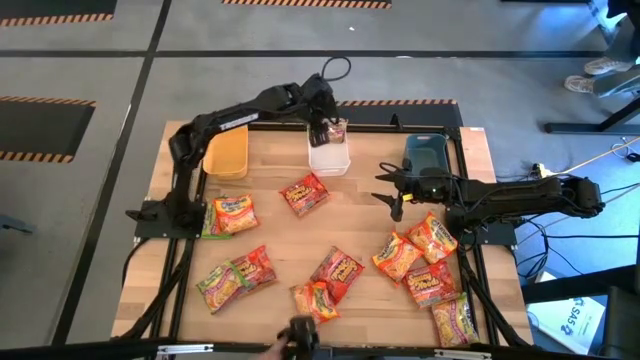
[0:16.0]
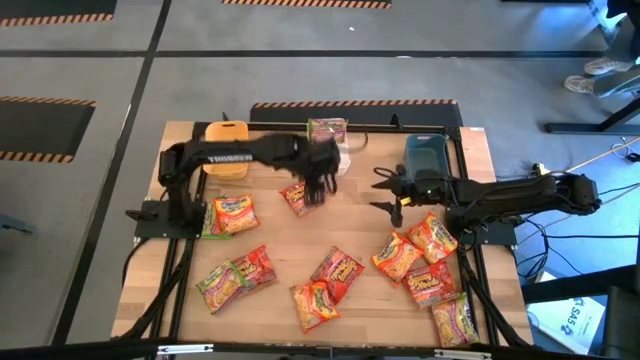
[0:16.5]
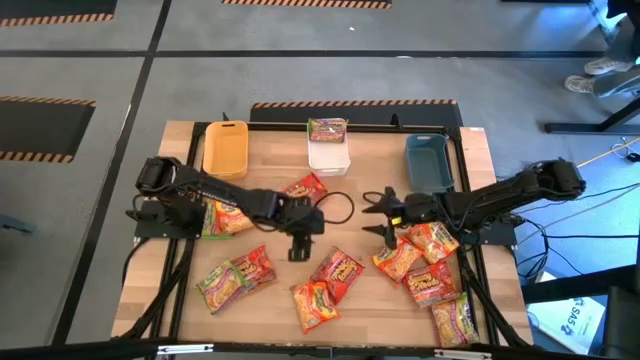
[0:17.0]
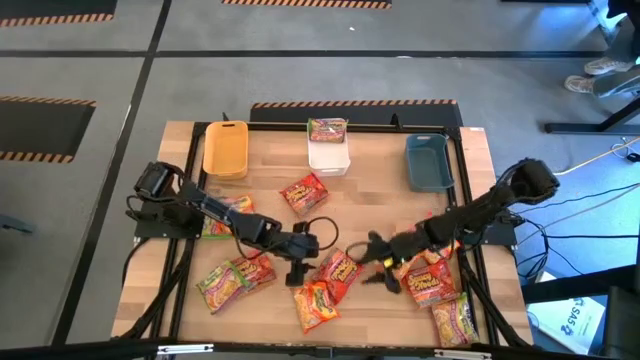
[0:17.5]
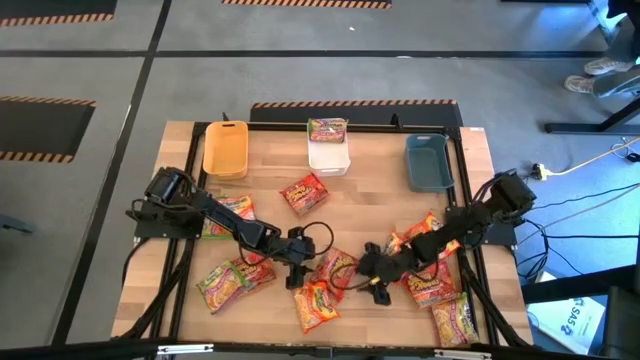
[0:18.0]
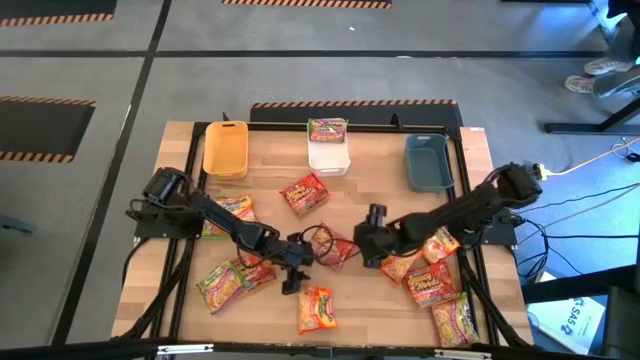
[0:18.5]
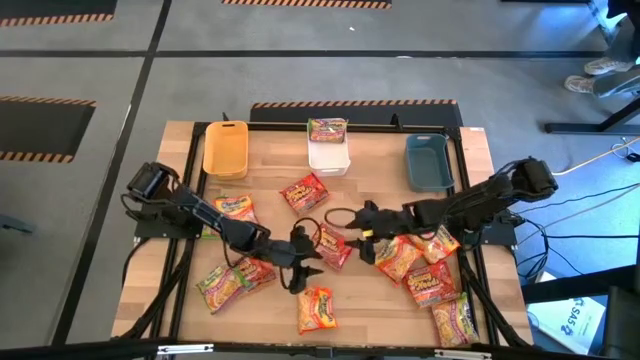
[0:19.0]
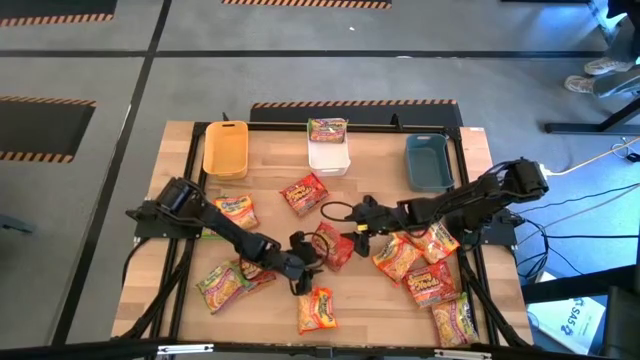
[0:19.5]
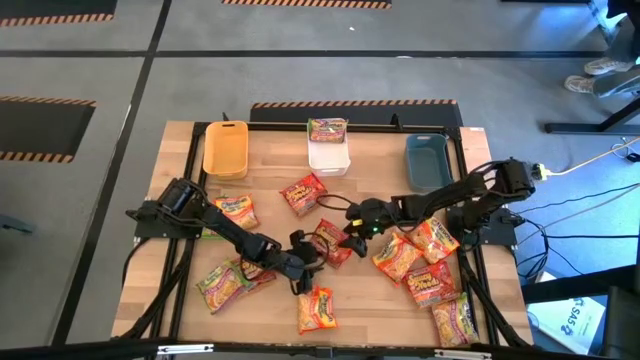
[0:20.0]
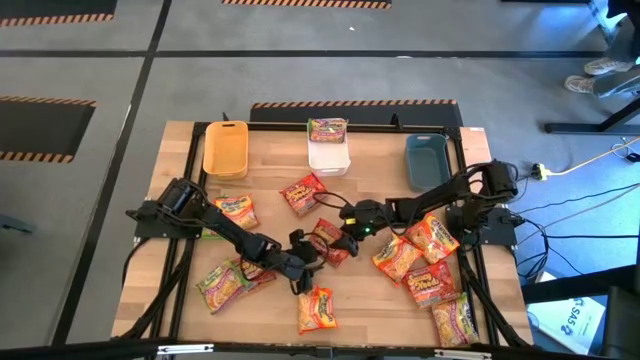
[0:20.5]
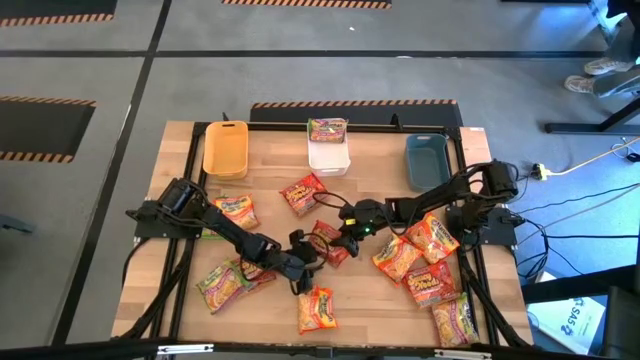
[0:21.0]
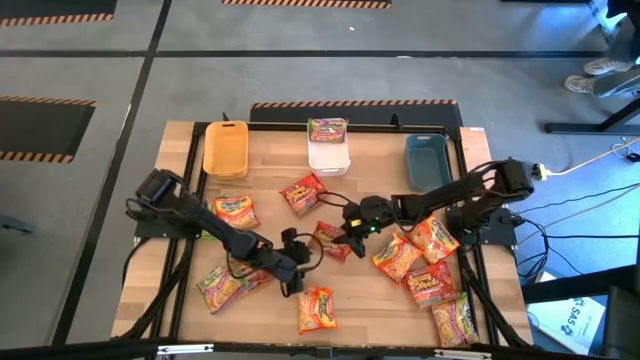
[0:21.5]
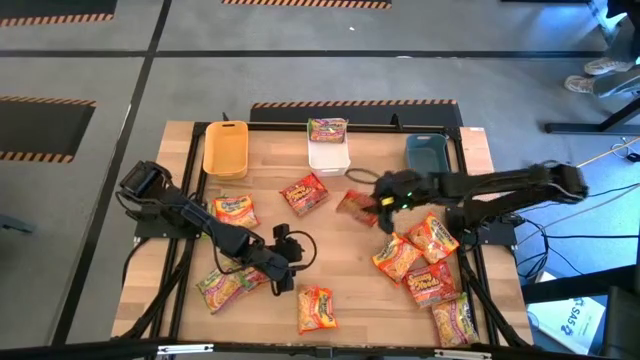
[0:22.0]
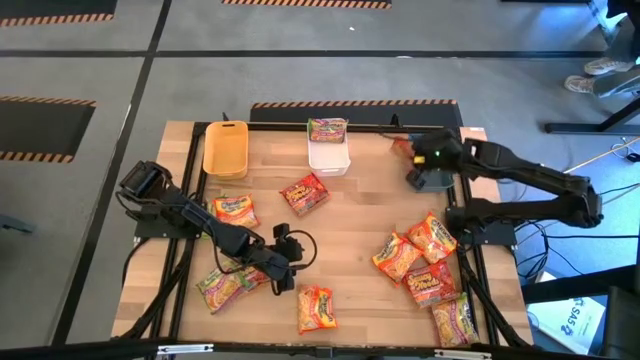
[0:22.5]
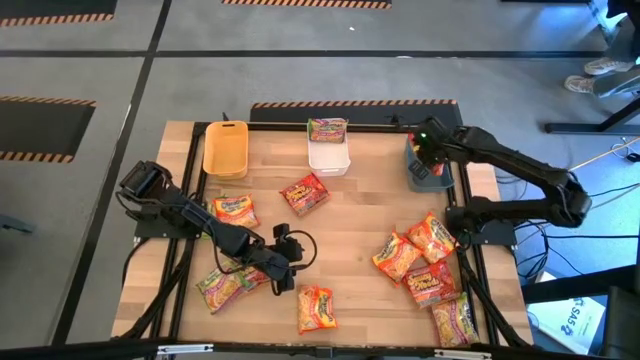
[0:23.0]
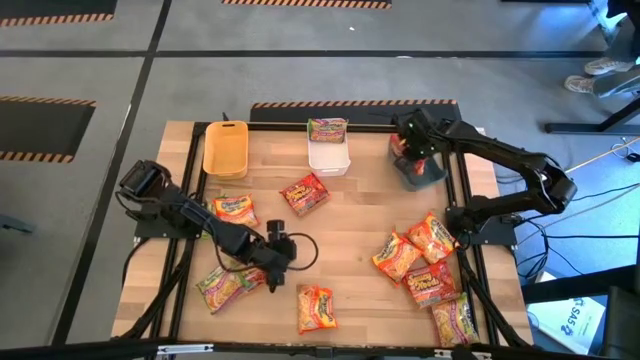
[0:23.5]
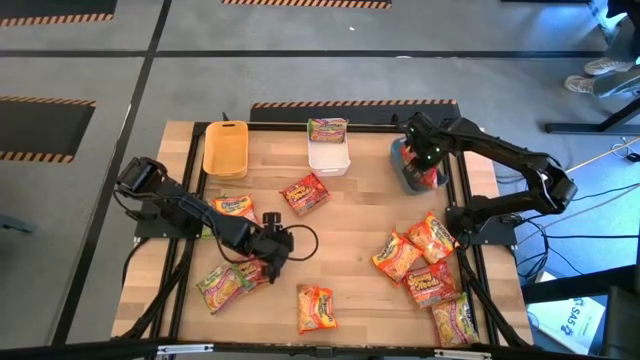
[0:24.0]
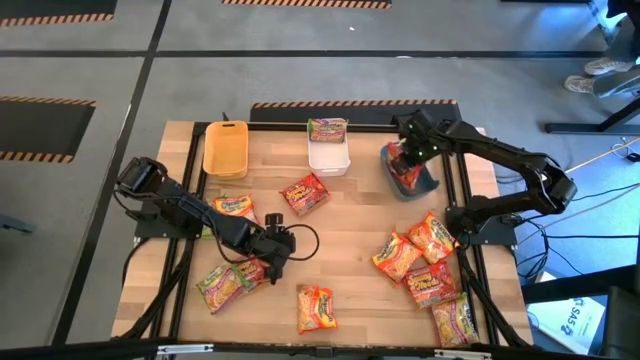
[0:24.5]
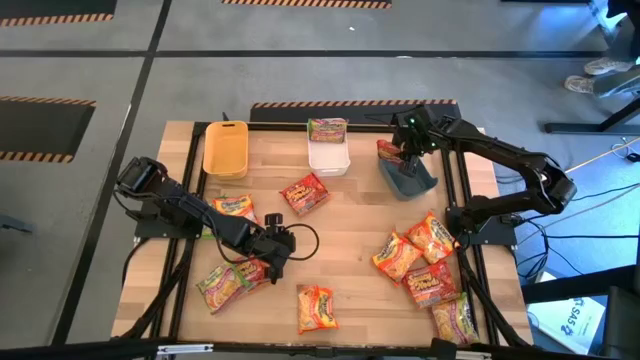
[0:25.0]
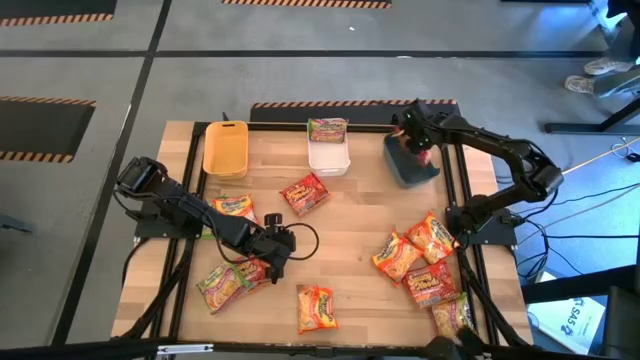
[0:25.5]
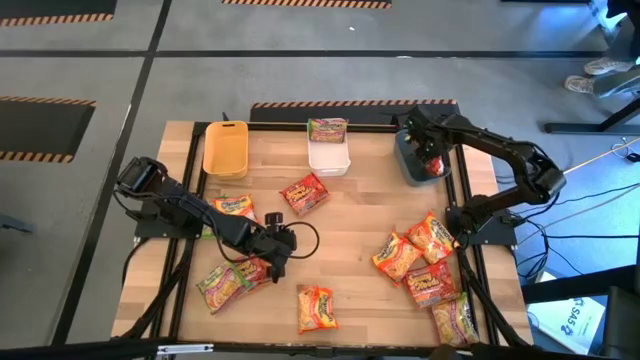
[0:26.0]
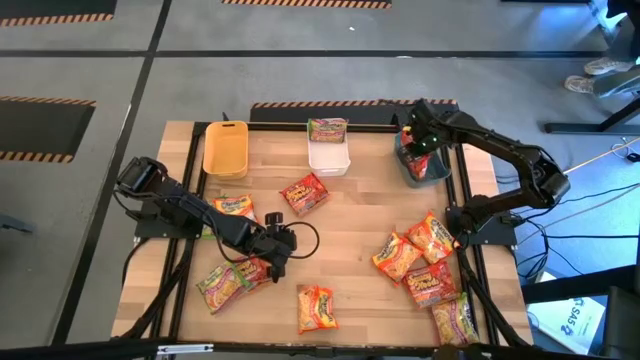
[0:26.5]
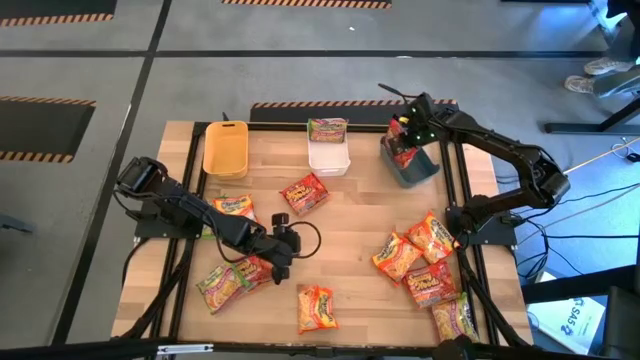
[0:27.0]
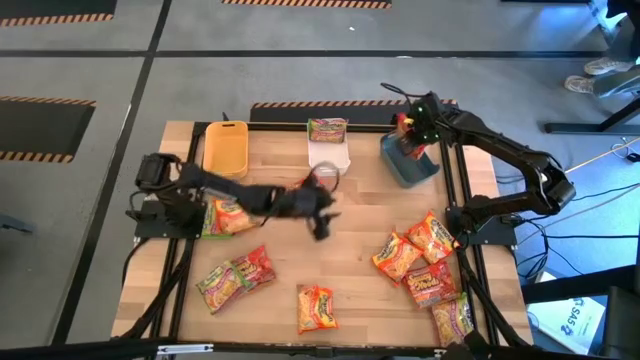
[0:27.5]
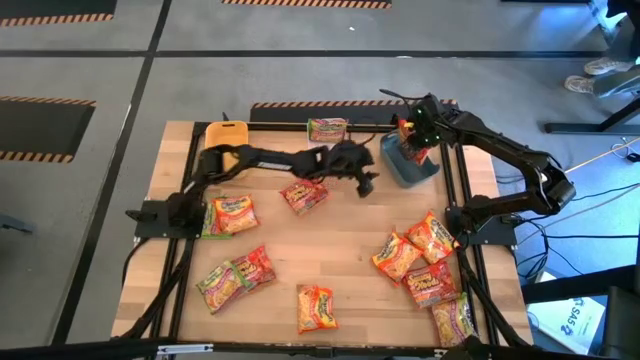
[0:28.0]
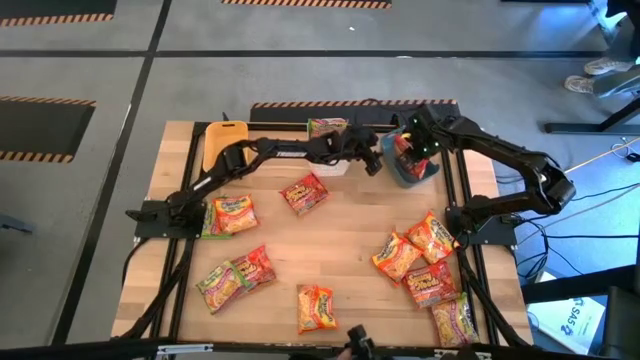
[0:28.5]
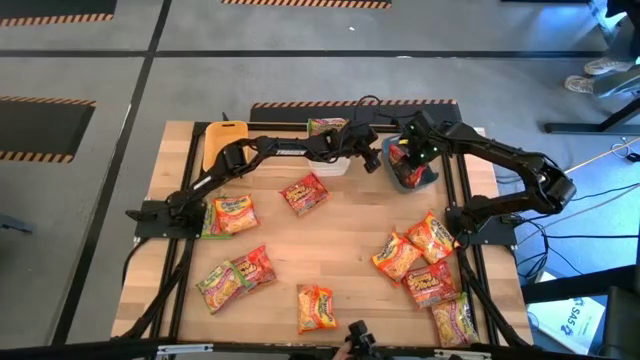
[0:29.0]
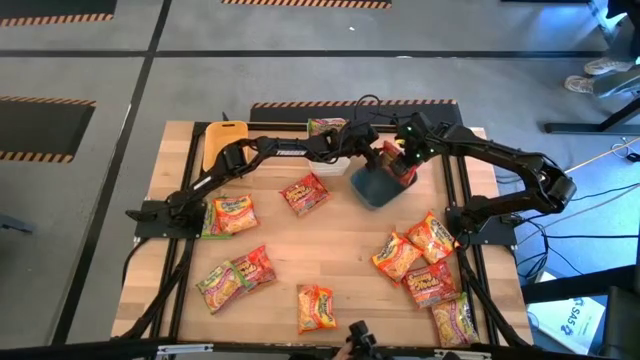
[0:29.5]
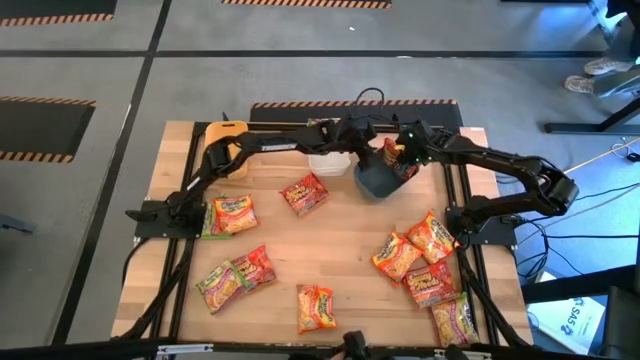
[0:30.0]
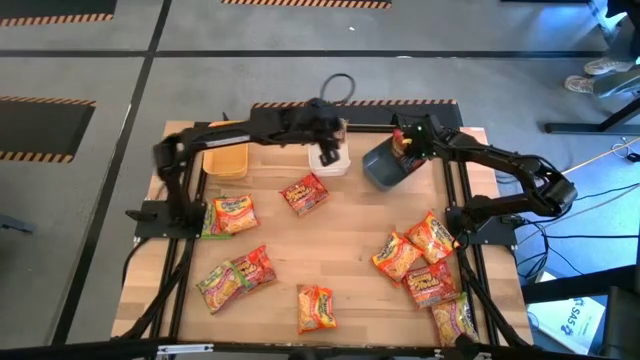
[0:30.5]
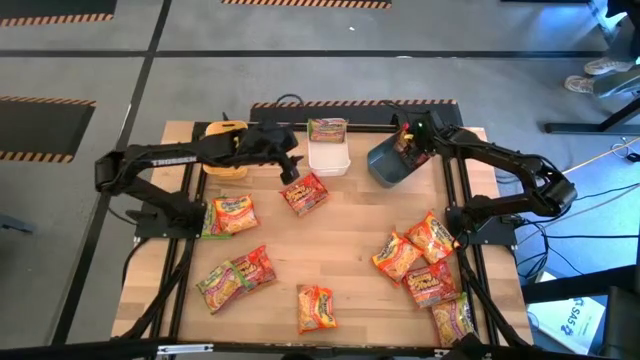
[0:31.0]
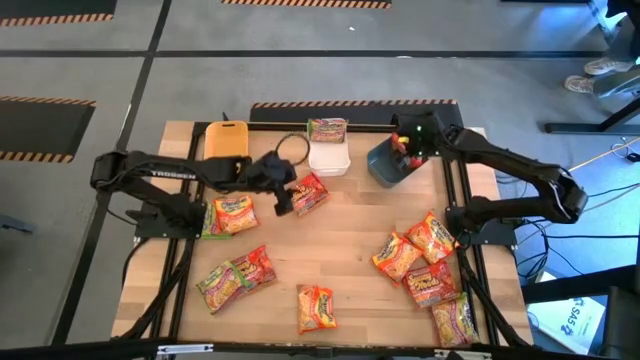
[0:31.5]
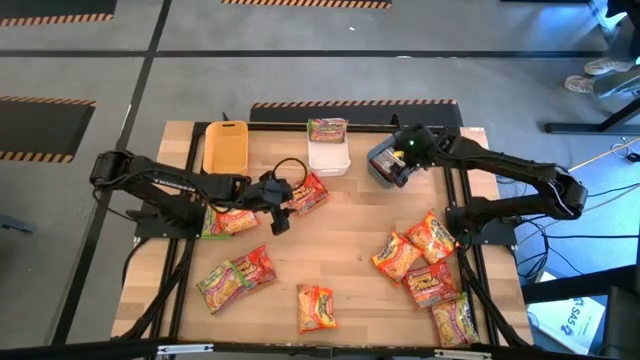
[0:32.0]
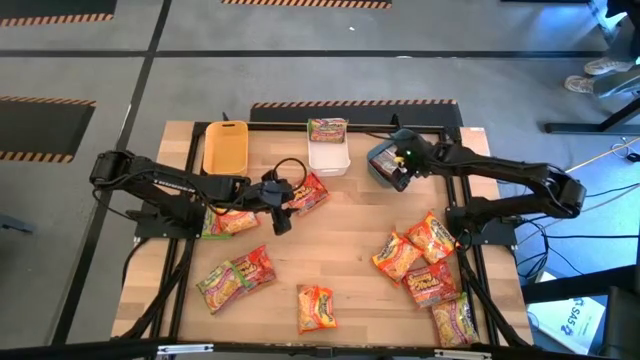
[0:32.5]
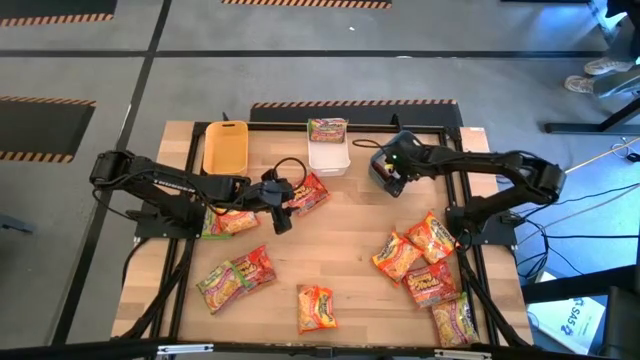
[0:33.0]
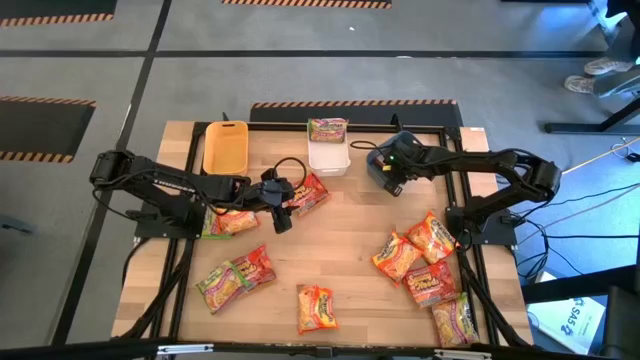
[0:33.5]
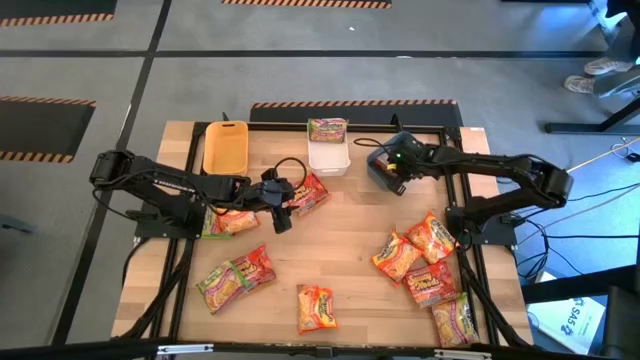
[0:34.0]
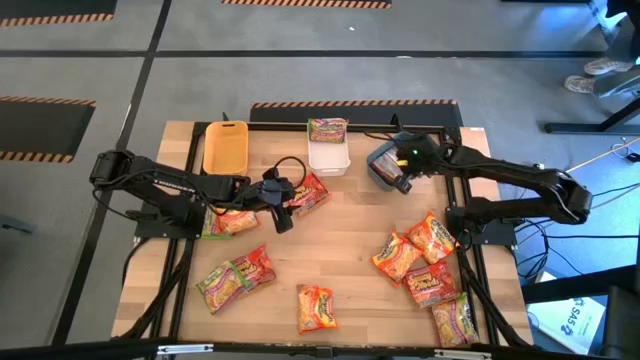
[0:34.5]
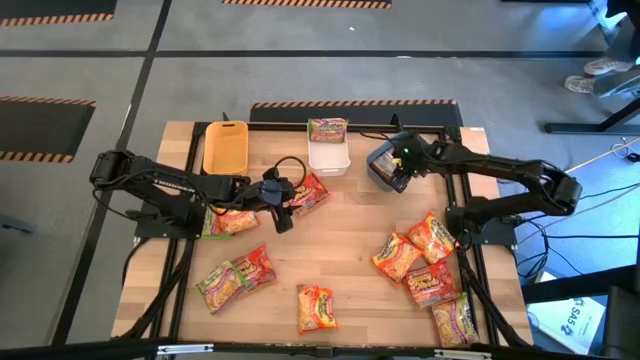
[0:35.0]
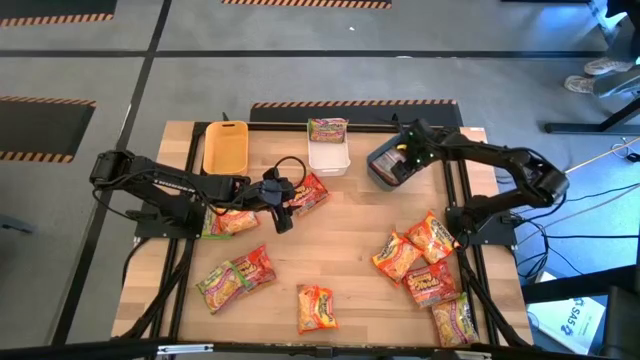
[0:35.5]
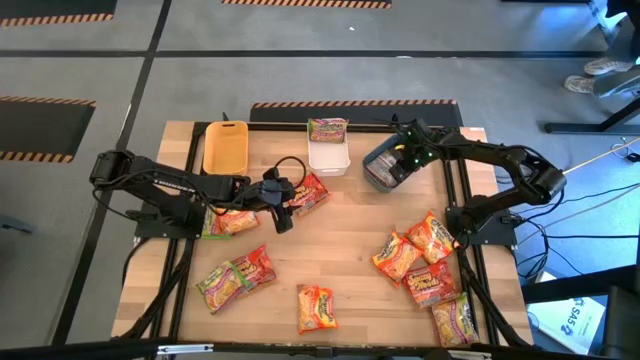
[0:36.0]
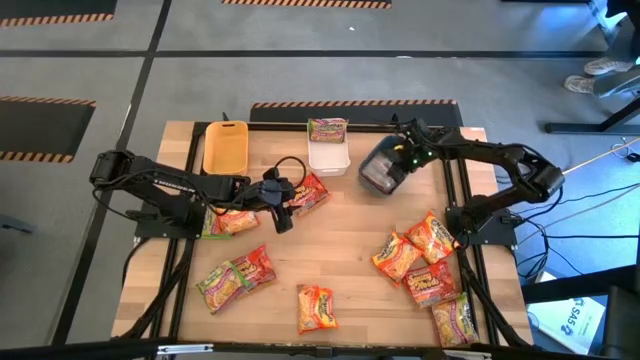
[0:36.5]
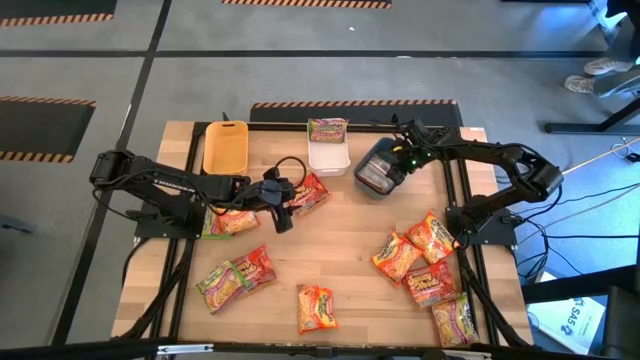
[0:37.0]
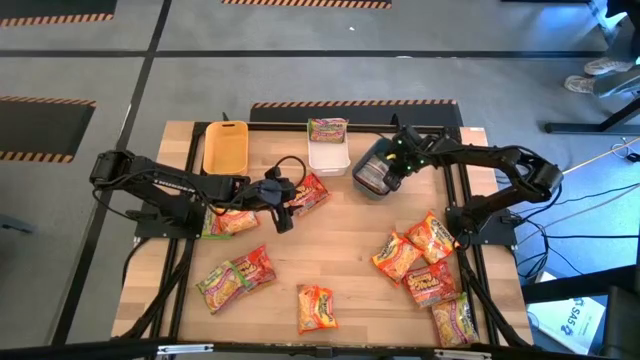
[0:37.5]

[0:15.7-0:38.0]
Task: Sort Maruchan noodles
Put the red noodle pack into the blue bin
